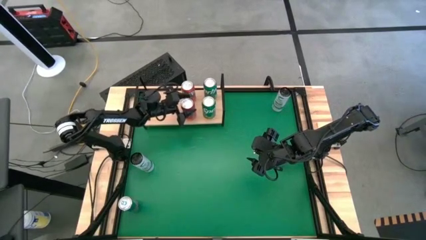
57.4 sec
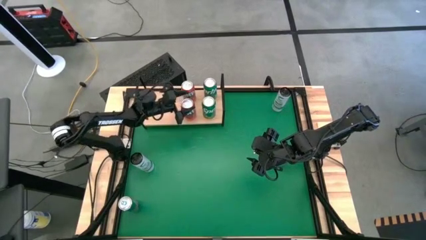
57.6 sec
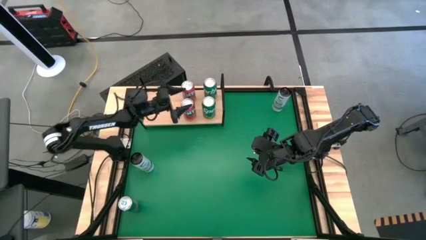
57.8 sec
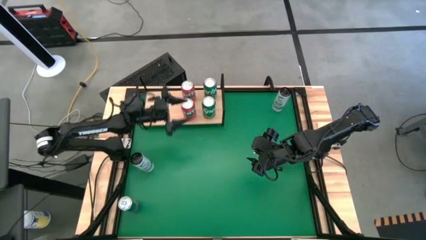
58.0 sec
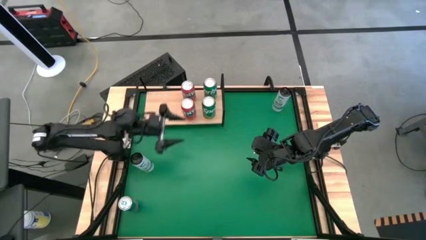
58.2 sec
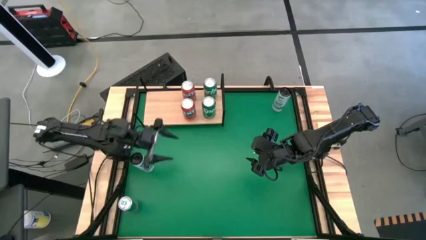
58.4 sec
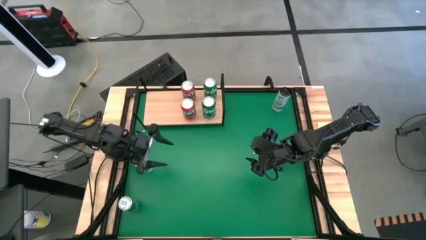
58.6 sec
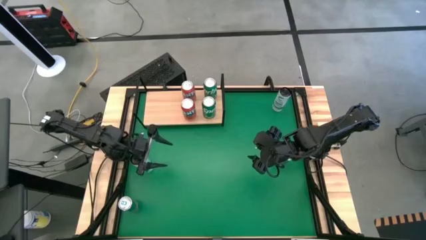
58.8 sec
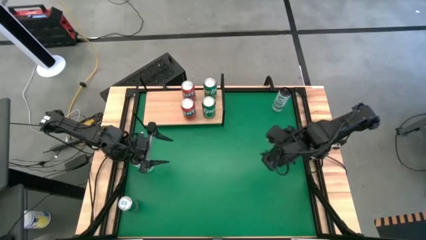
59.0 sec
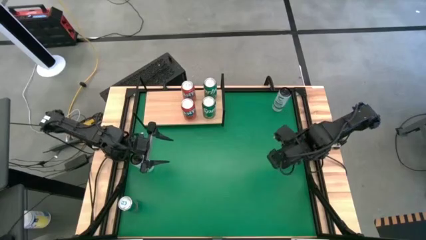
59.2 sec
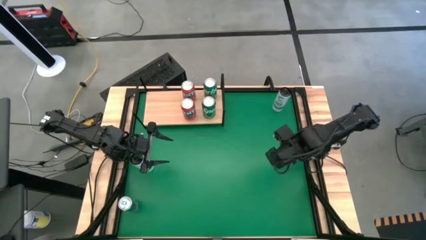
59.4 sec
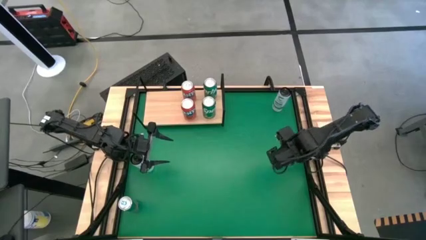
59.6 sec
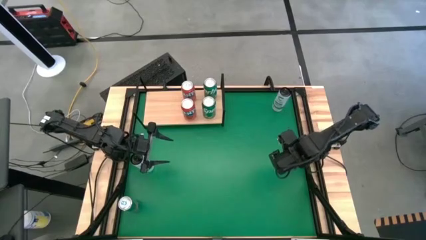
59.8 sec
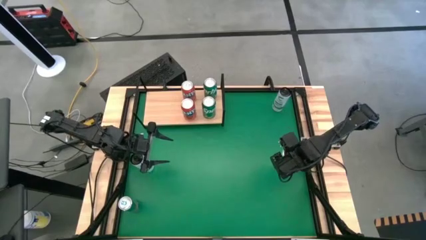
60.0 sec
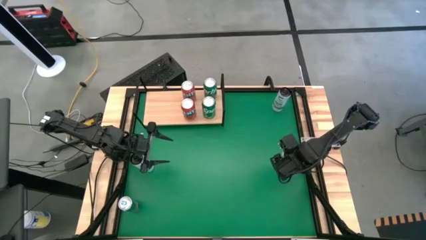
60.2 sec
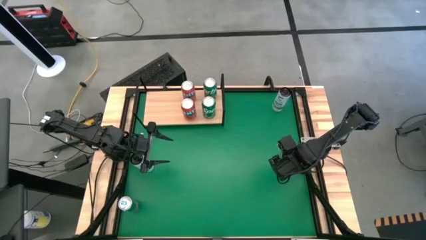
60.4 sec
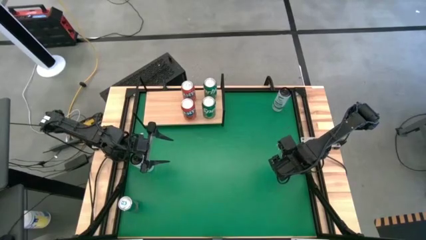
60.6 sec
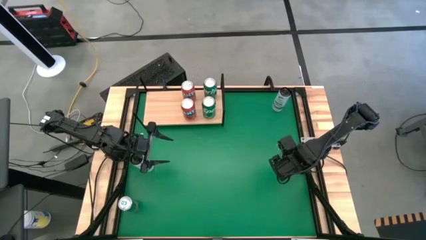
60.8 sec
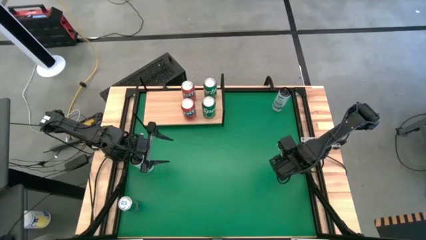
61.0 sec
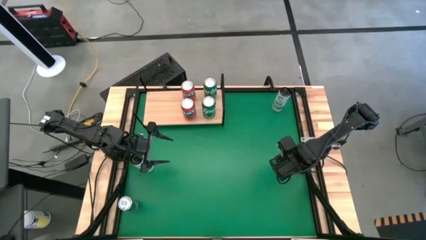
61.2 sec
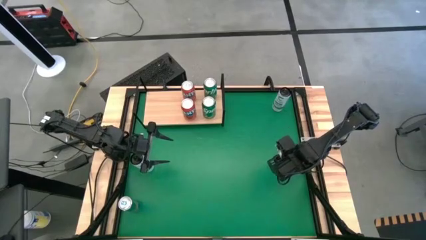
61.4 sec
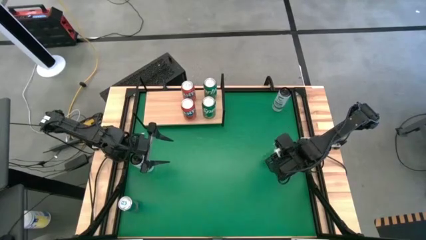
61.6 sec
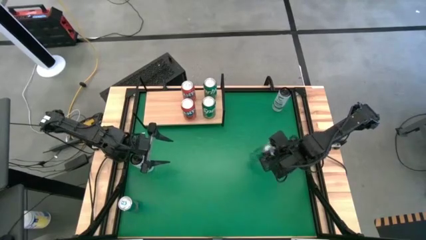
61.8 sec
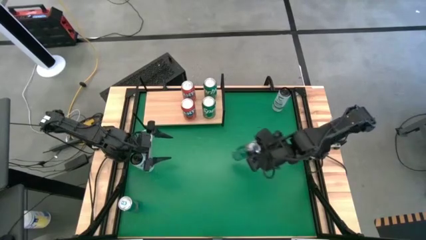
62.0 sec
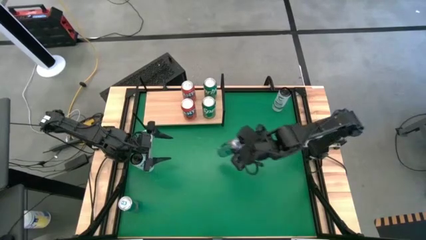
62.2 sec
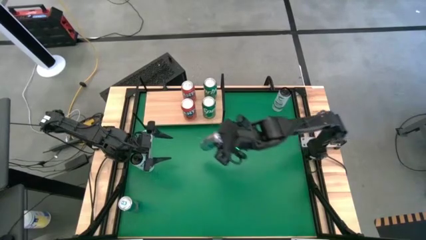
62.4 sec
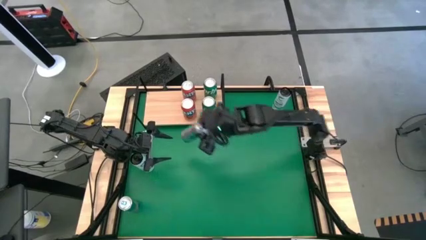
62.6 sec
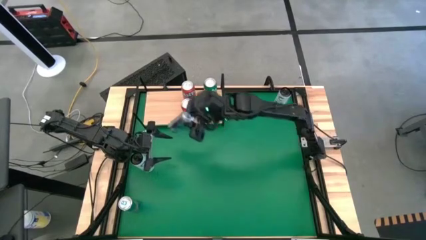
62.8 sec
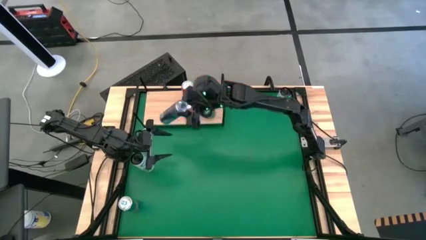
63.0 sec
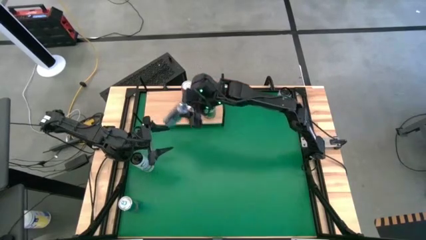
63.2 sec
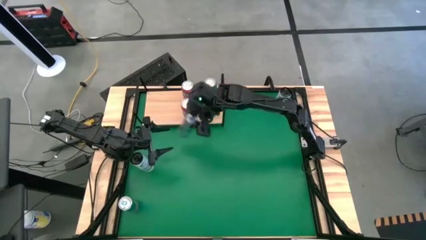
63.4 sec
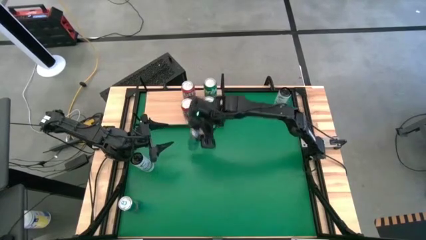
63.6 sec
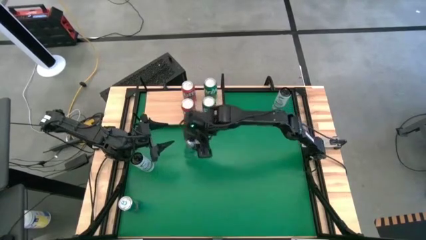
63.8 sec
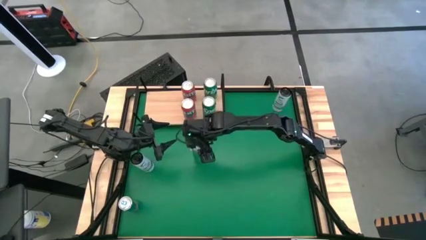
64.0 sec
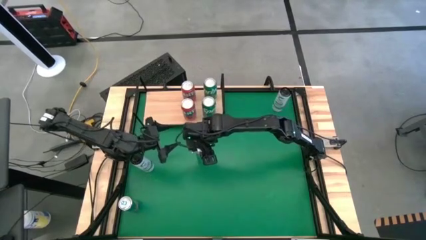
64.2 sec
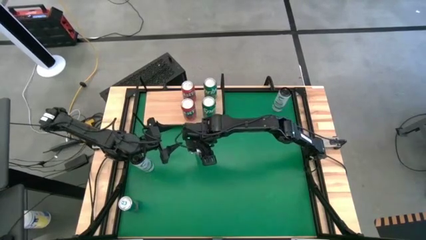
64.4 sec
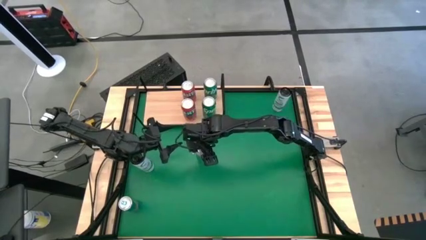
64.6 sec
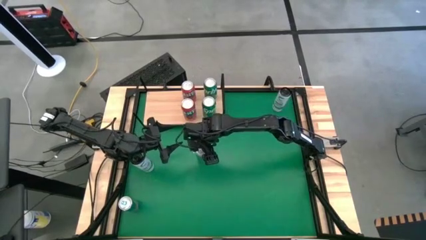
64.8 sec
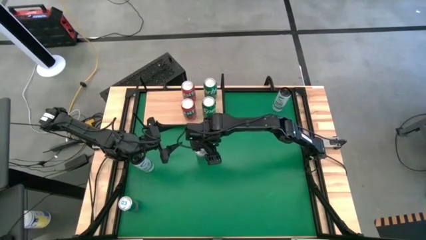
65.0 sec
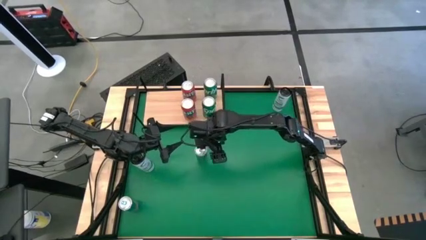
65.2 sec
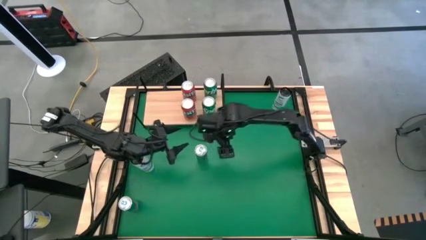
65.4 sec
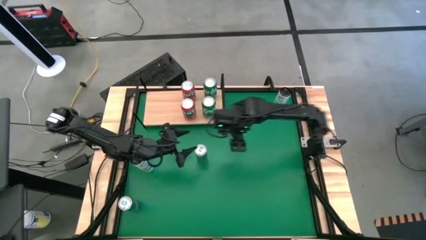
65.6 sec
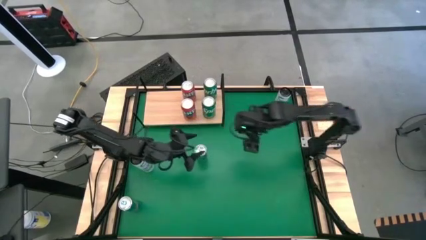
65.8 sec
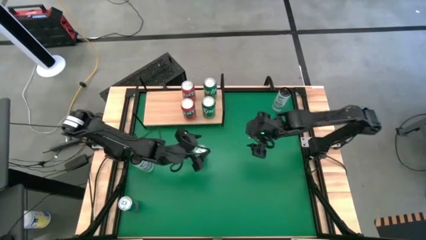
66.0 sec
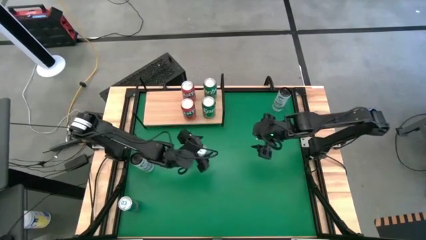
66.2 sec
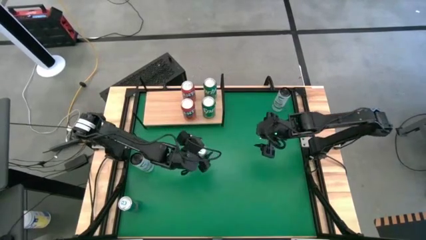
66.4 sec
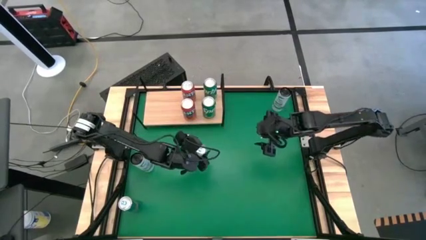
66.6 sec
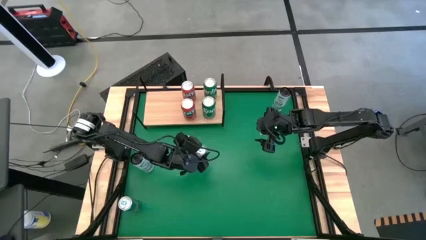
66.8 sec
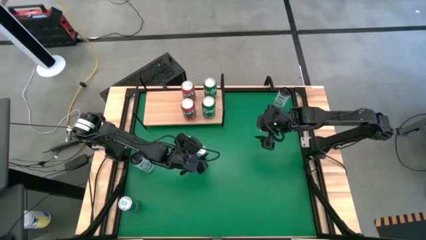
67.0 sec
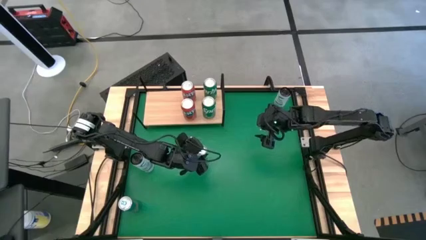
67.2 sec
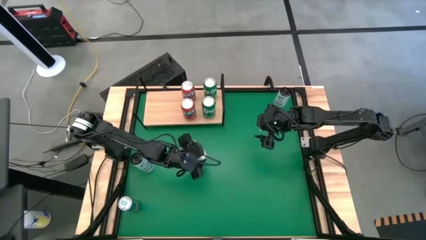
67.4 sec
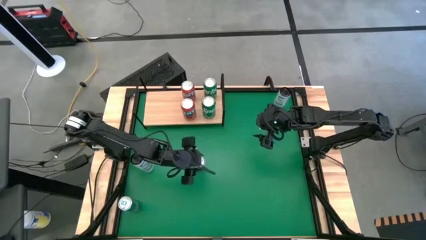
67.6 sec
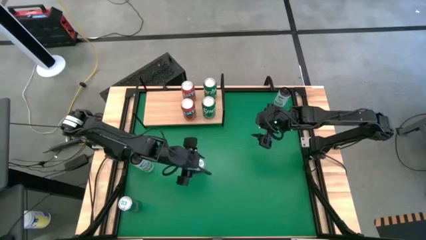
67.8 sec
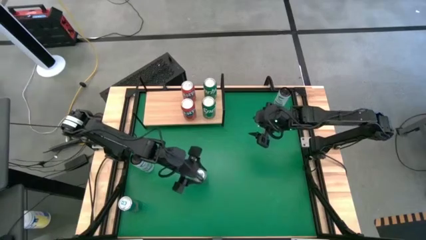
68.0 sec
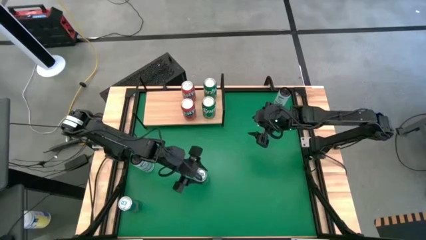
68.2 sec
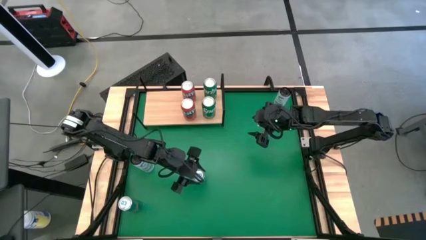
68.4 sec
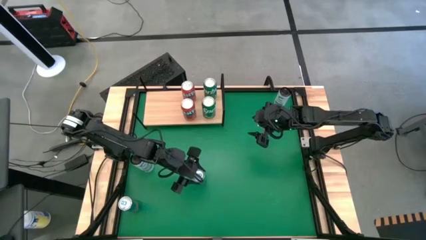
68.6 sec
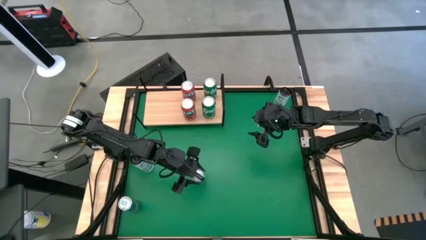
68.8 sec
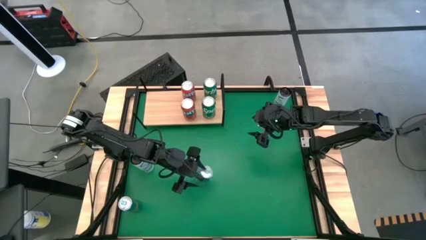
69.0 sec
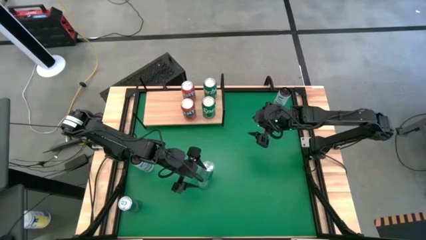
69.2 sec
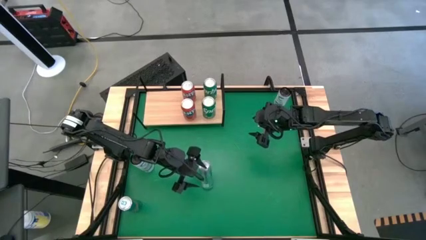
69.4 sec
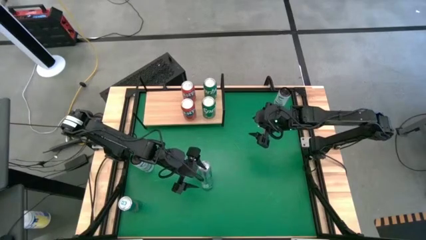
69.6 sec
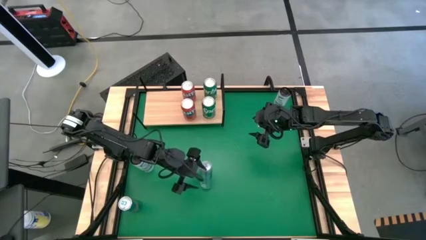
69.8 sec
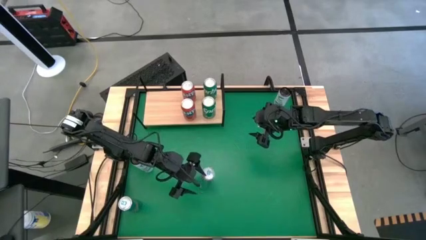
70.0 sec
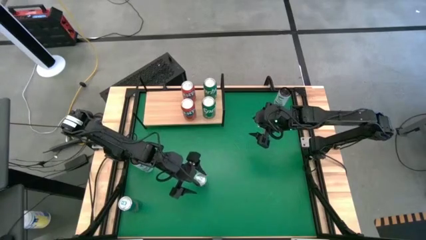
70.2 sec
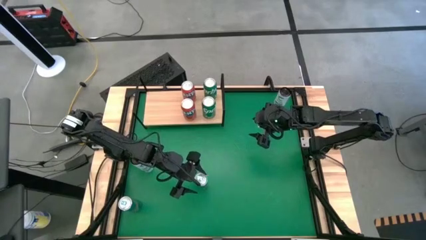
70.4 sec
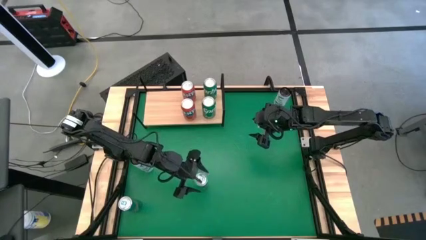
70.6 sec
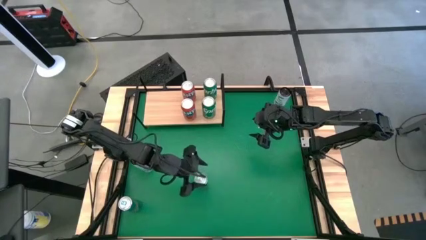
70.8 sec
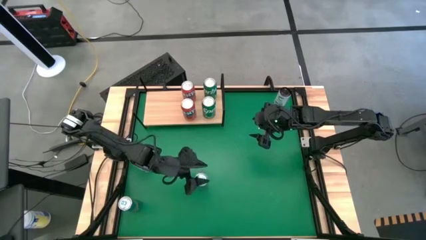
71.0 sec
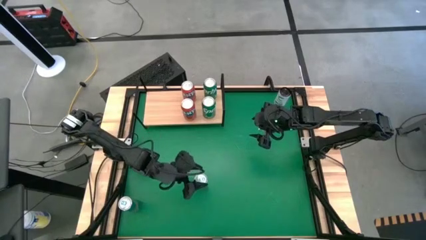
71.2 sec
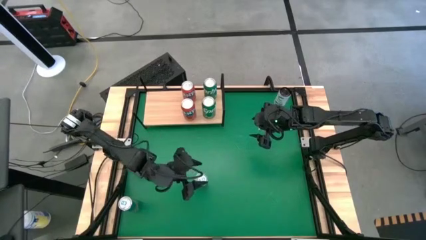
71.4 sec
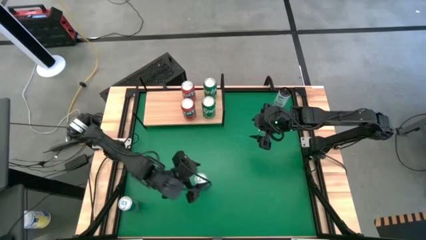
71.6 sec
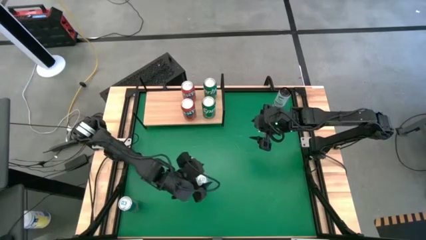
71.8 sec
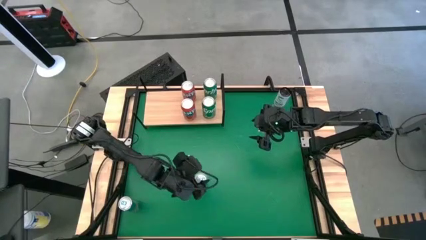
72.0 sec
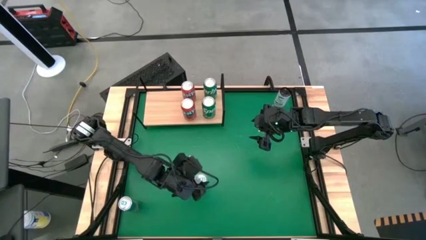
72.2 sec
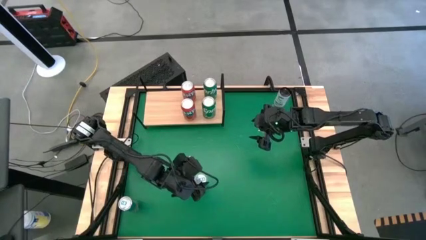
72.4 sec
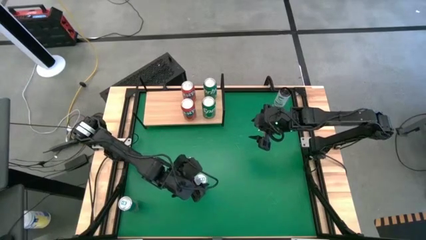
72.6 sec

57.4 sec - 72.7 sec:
Task: Place canned beverage on shelf
Put the right blue soda can on the shelf

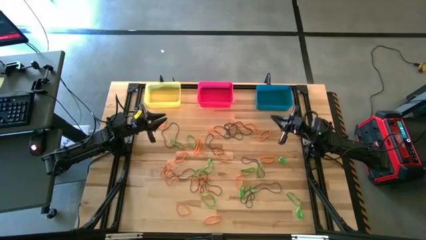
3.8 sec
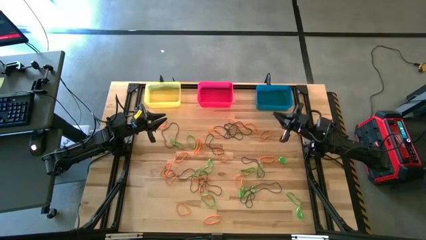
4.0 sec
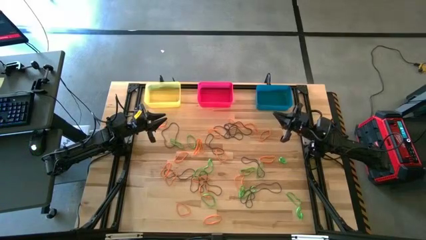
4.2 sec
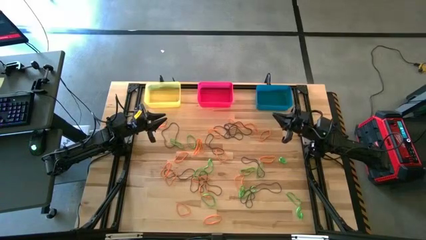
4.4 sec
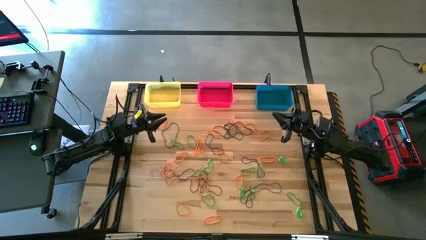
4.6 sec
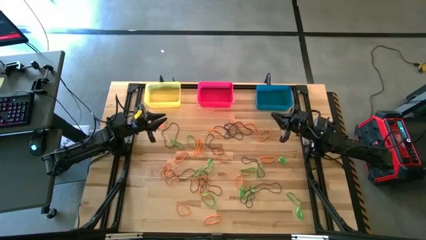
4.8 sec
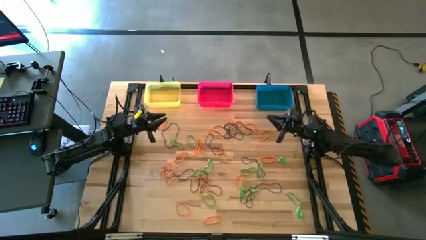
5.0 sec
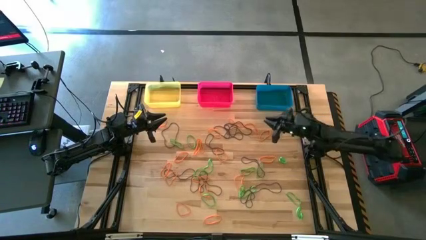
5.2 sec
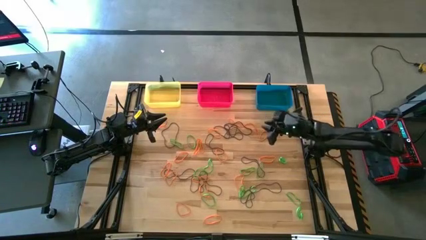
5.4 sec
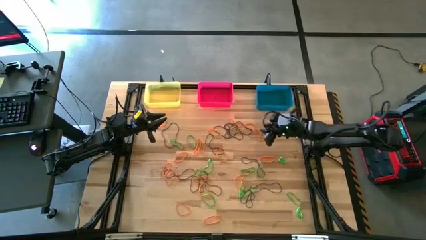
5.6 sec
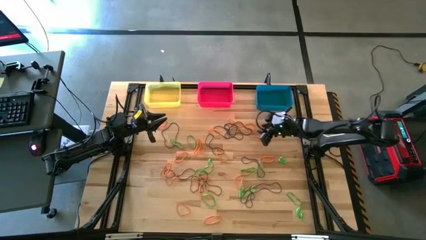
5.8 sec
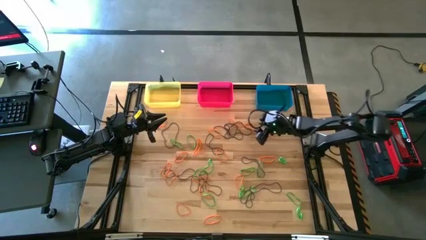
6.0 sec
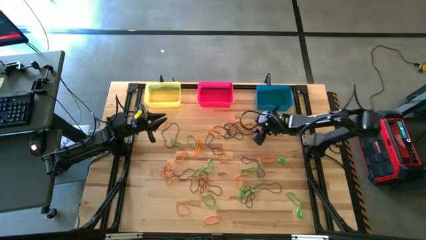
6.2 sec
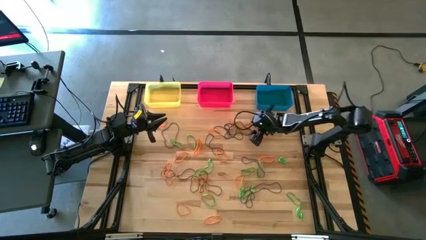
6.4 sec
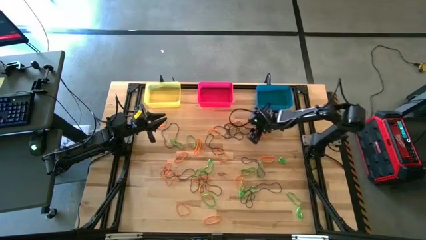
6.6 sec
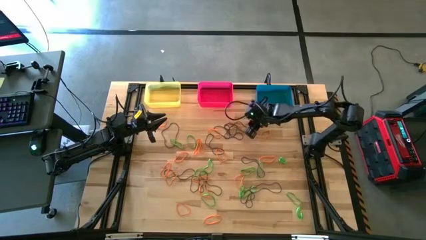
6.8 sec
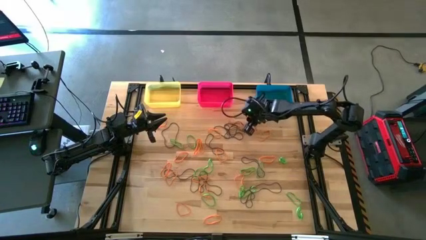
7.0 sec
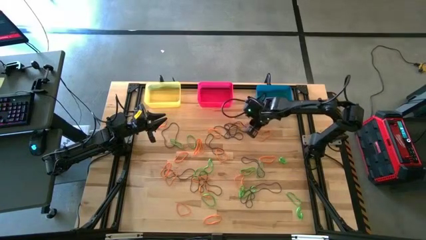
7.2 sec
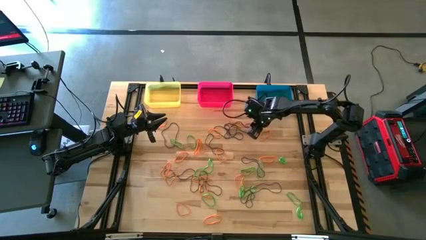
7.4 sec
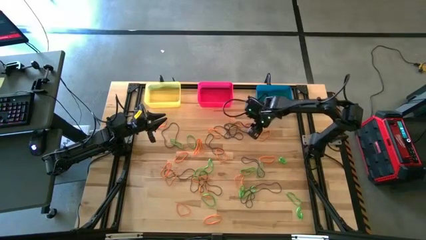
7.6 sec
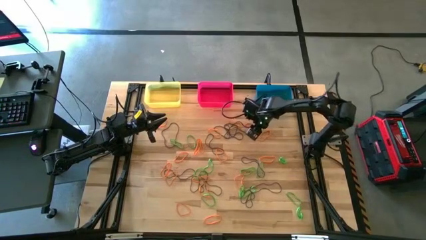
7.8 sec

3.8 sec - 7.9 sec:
Task: Sort rubber bands into baskets
Put the orange rubber band into the pink bin
